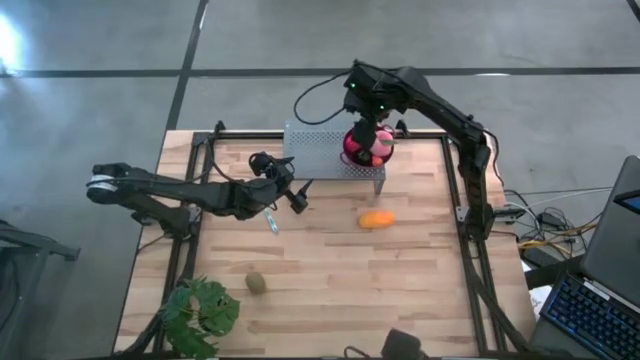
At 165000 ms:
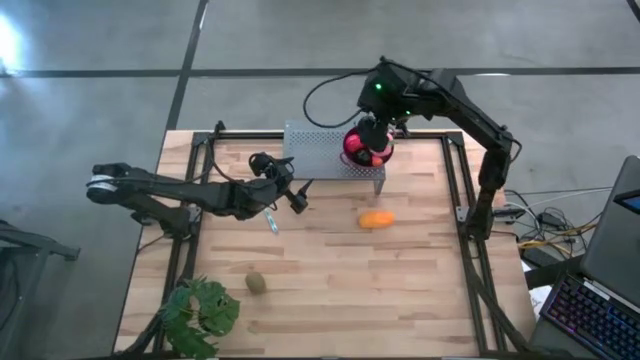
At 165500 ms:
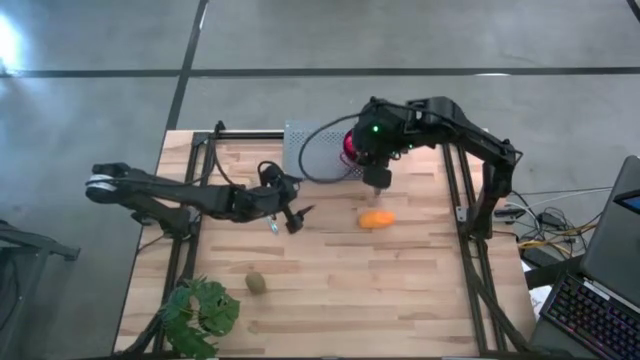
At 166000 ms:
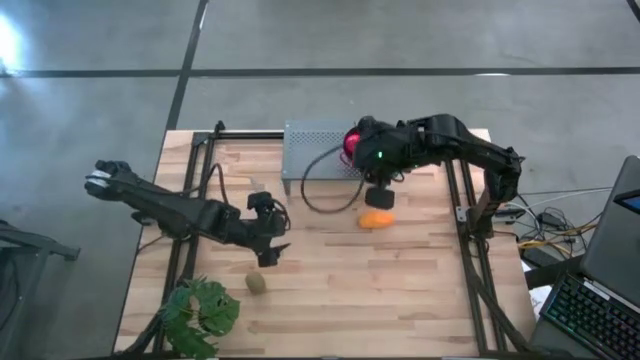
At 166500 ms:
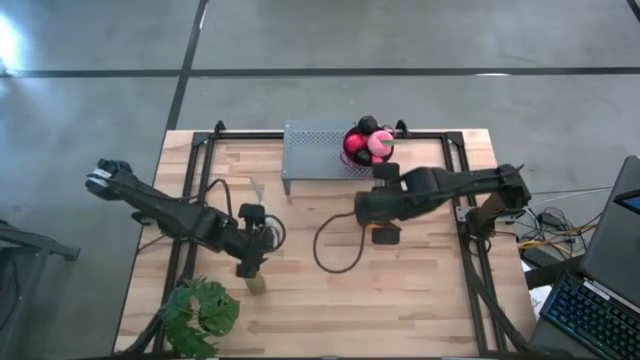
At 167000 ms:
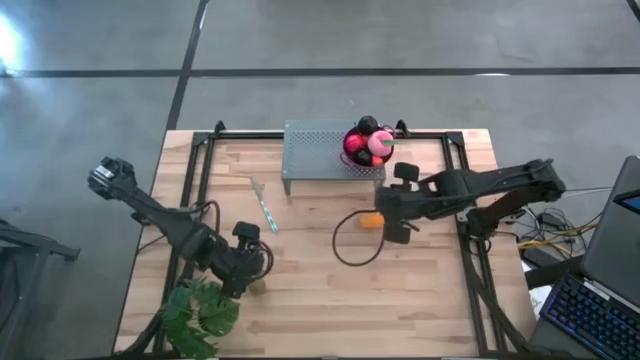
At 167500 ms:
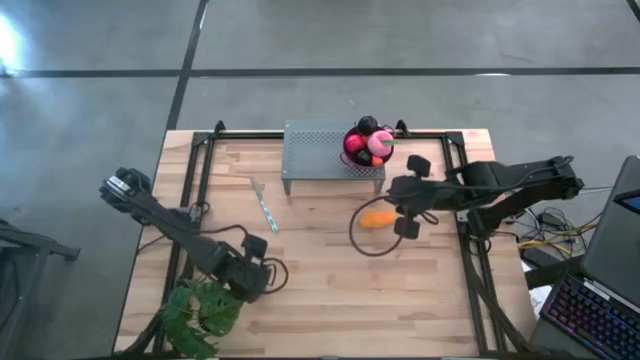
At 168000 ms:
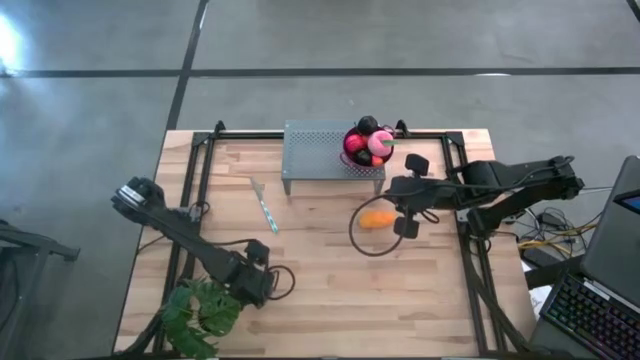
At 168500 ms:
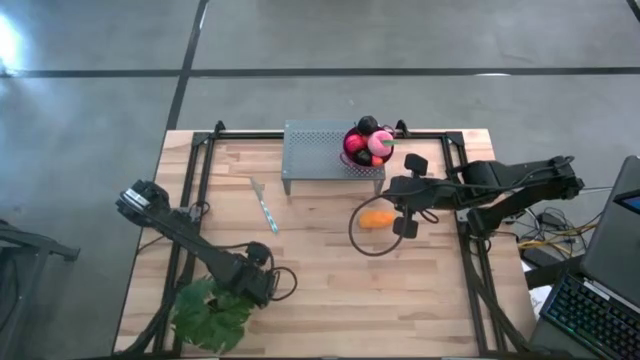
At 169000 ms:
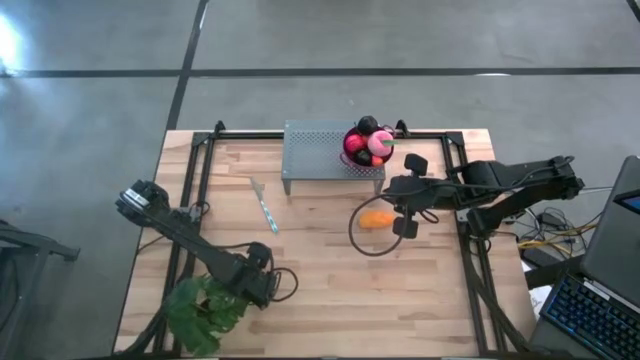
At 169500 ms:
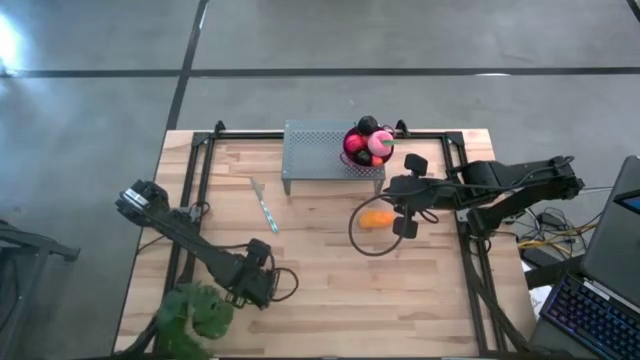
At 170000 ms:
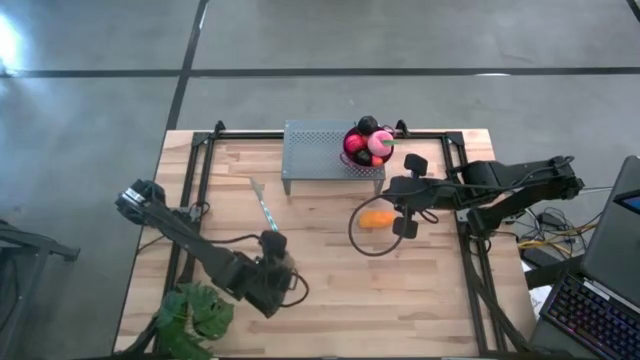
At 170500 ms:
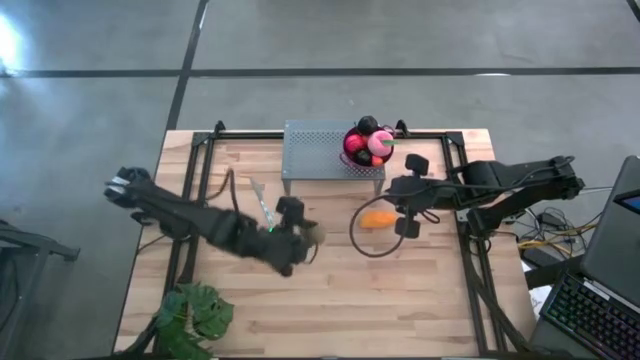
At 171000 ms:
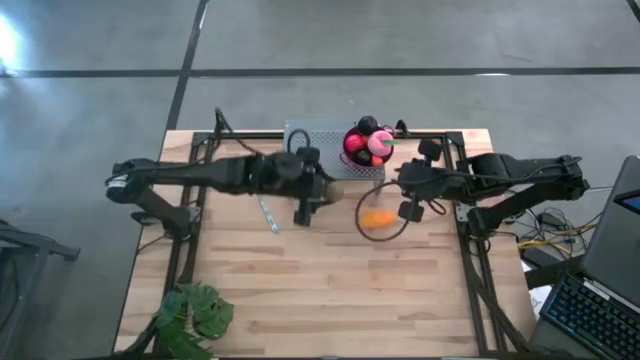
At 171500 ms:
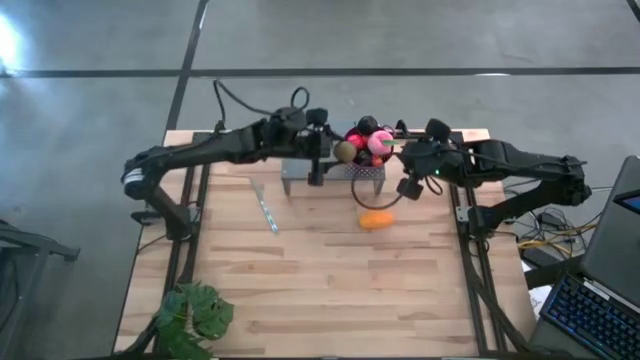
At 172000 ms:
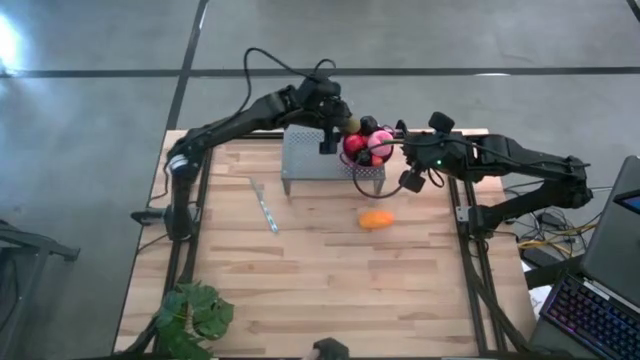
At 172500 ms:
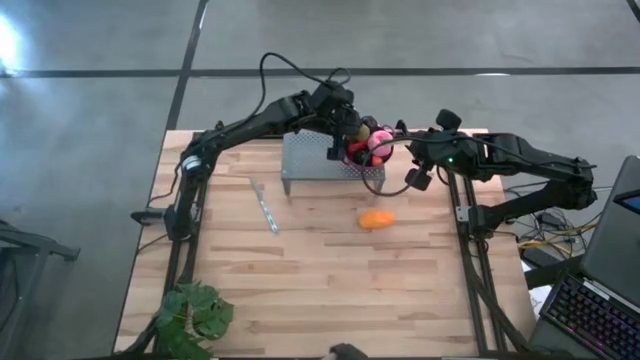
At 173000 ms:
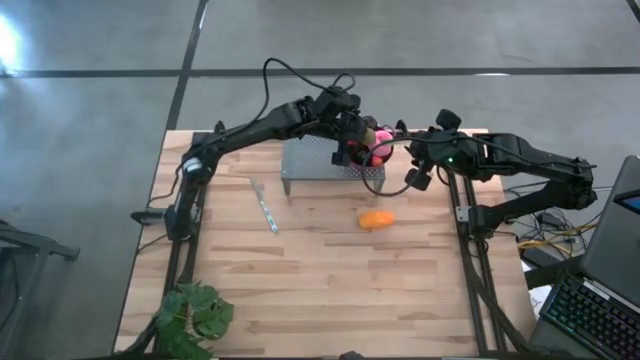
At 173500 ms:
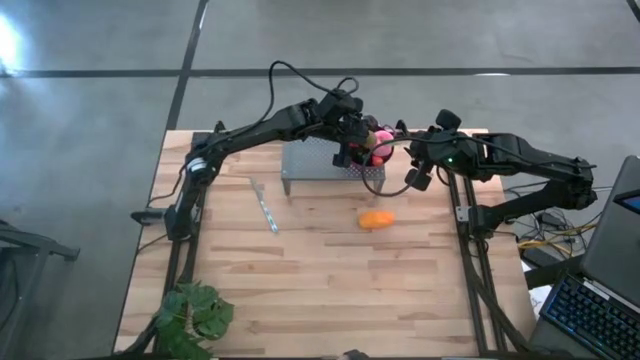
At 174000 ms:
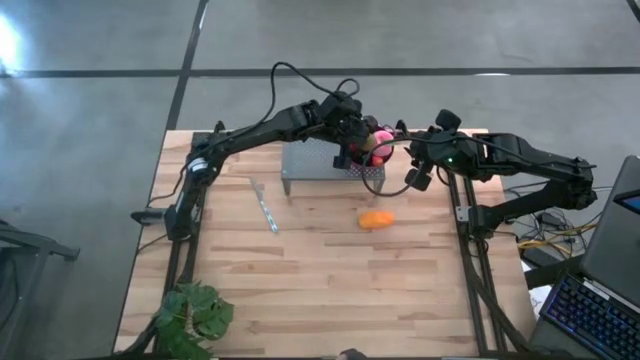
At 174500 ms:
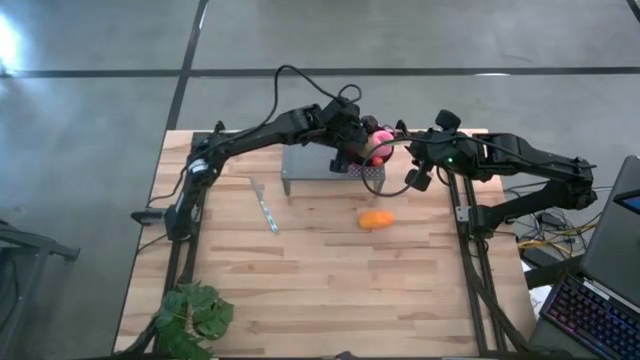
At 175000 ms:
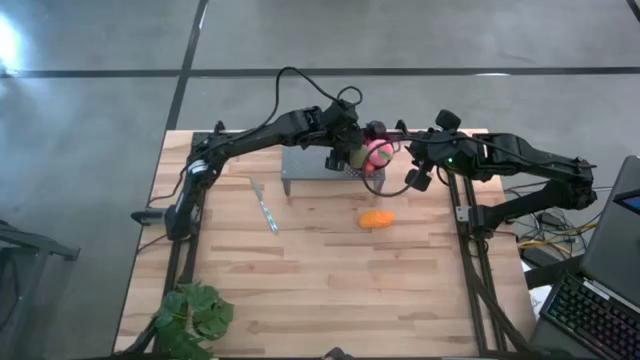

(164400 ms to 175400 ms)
Task: Pick & Place Fruit
Put the kiwi into the purple bowl on the shelf

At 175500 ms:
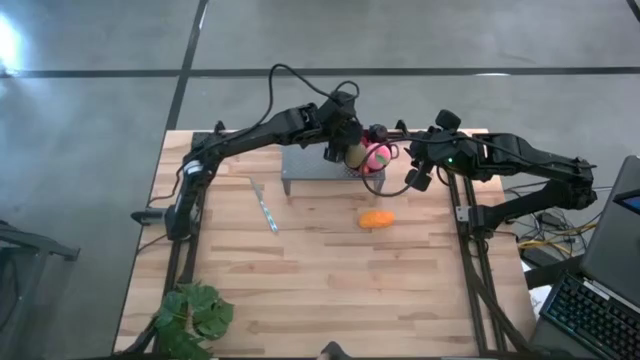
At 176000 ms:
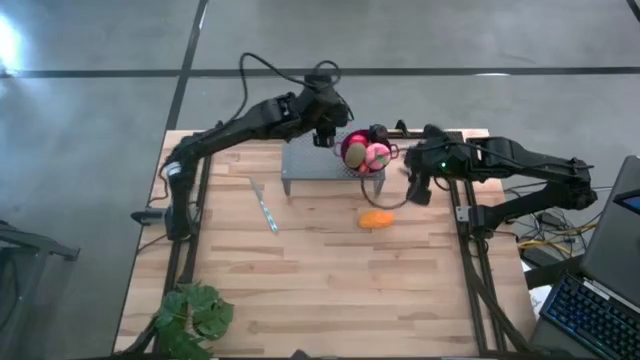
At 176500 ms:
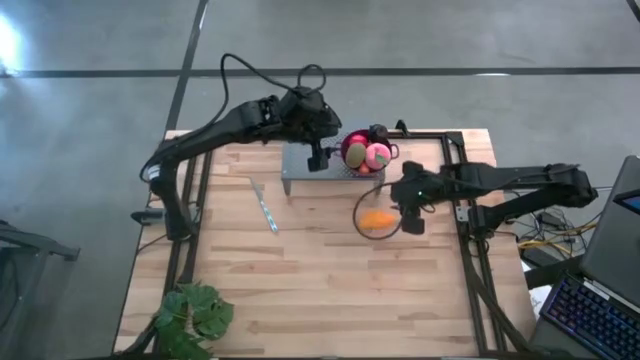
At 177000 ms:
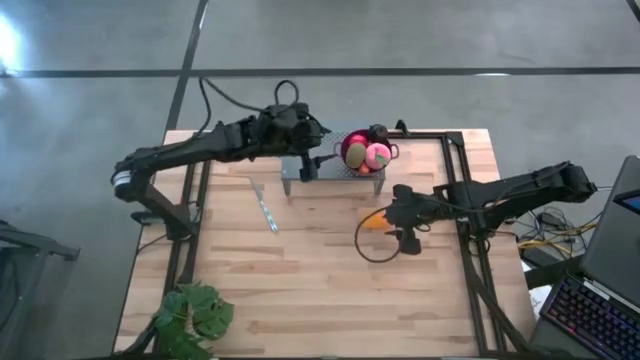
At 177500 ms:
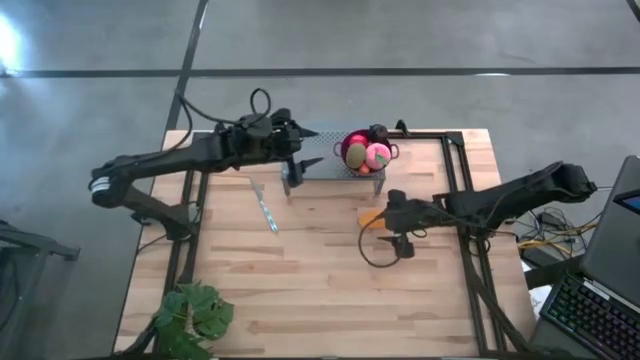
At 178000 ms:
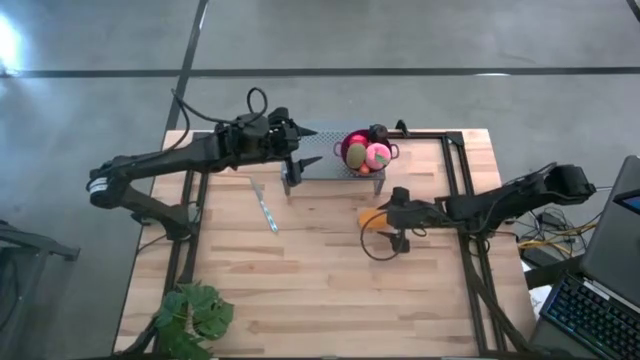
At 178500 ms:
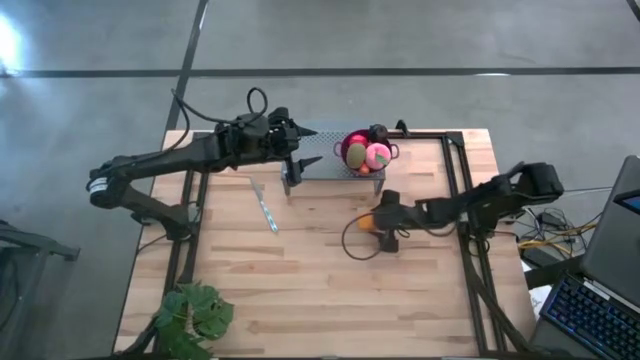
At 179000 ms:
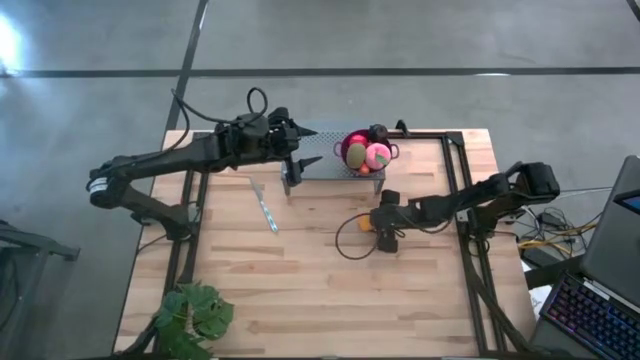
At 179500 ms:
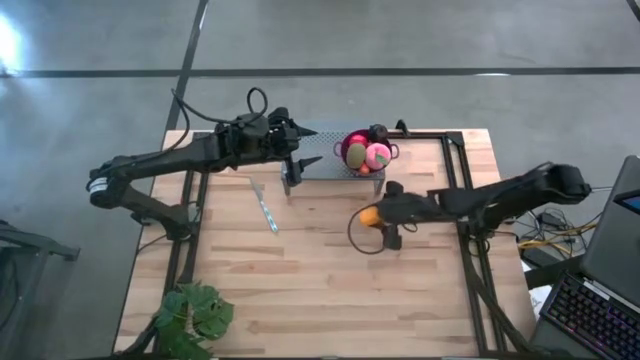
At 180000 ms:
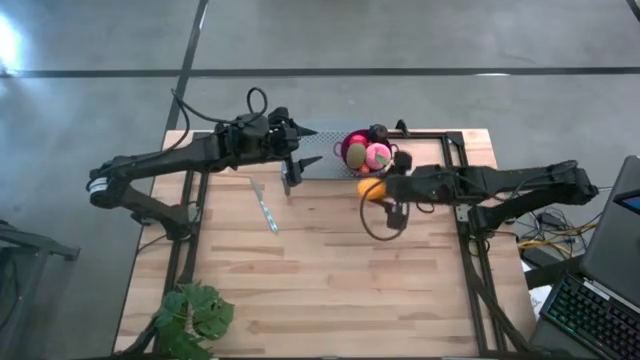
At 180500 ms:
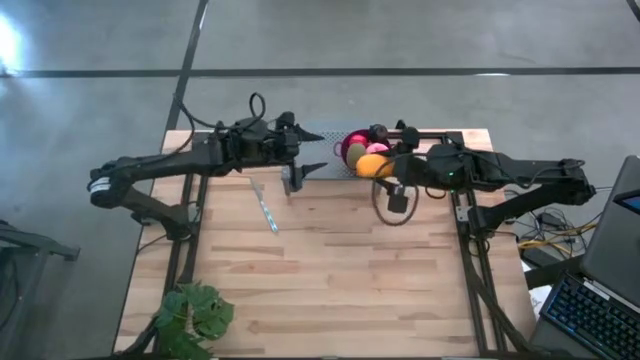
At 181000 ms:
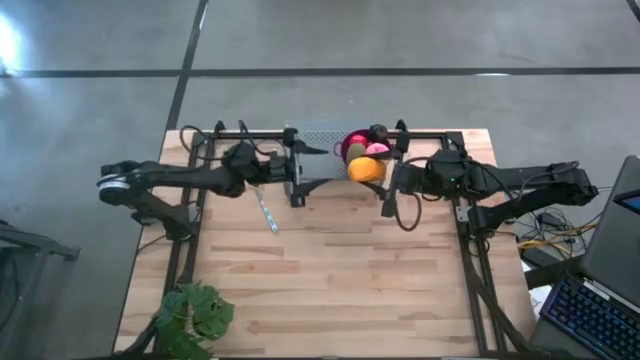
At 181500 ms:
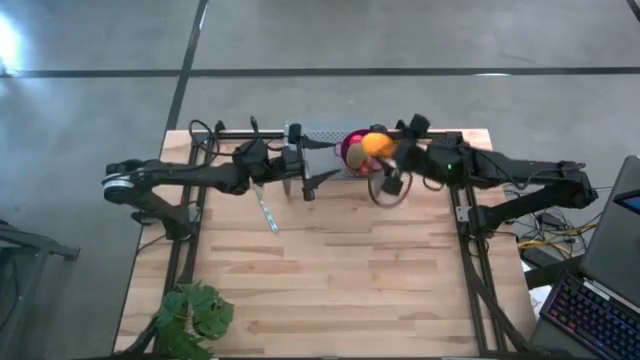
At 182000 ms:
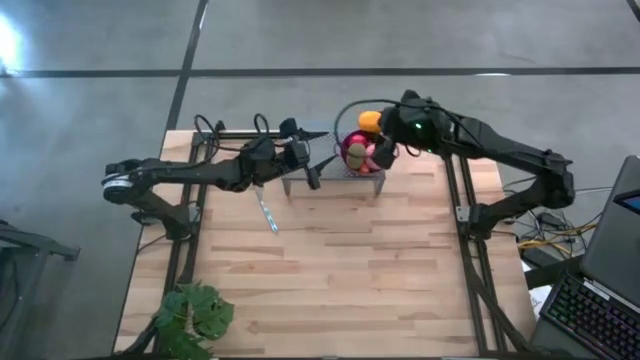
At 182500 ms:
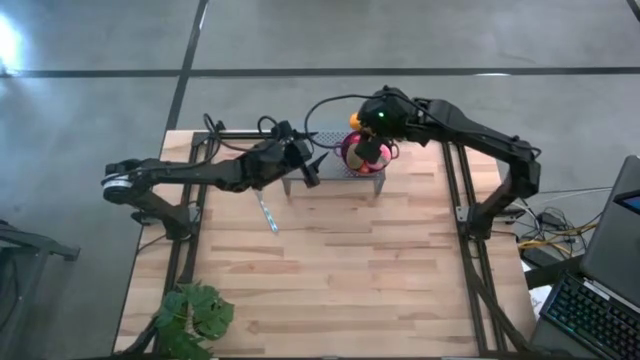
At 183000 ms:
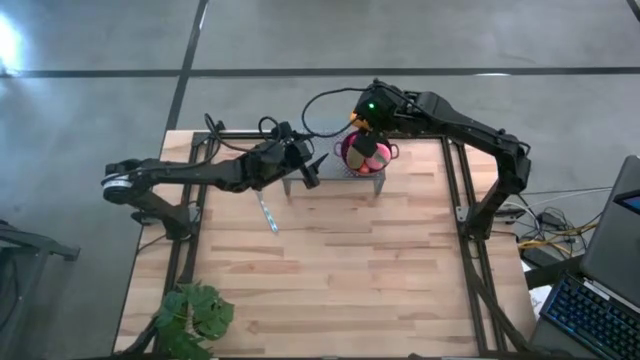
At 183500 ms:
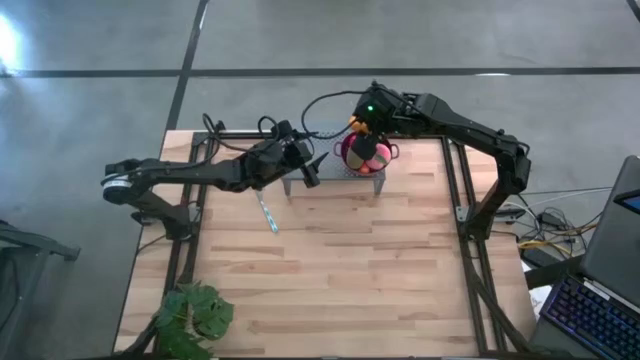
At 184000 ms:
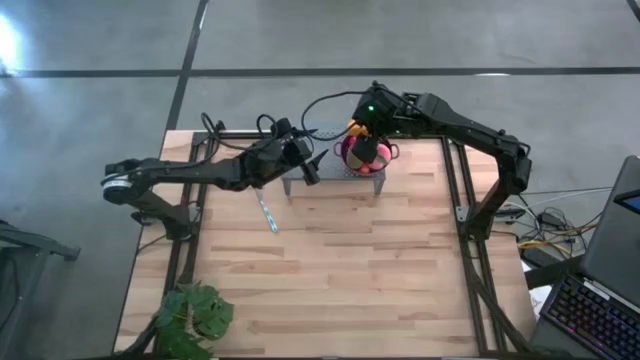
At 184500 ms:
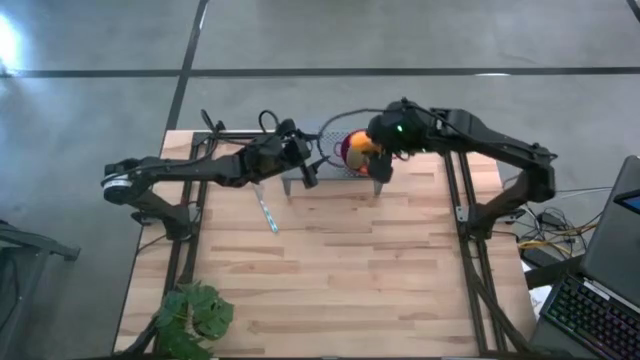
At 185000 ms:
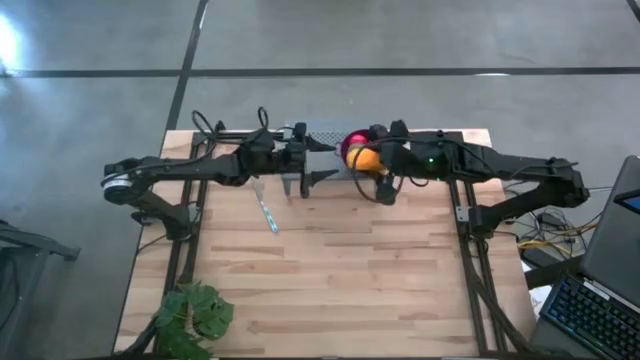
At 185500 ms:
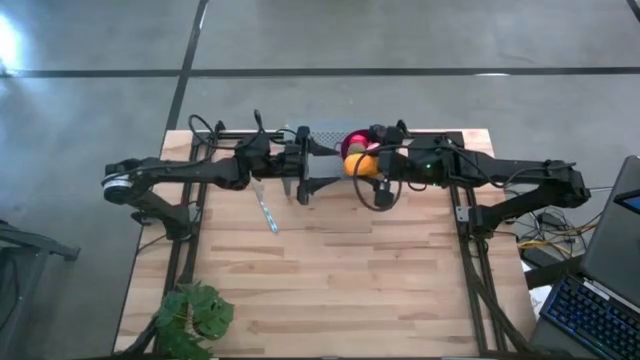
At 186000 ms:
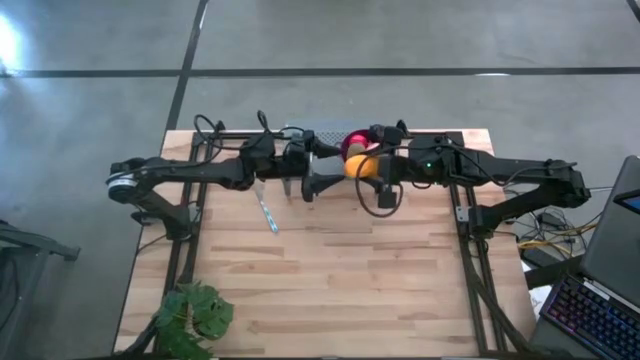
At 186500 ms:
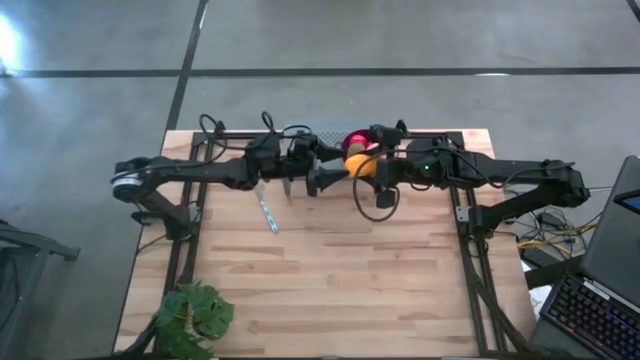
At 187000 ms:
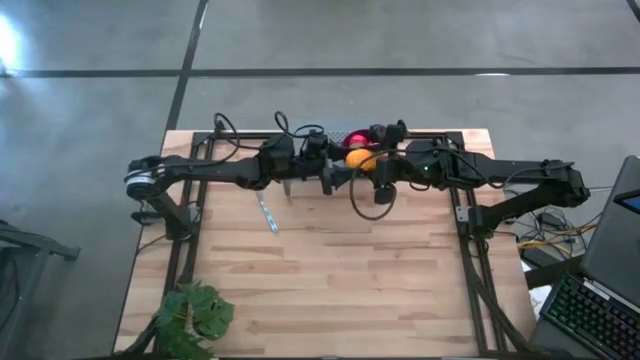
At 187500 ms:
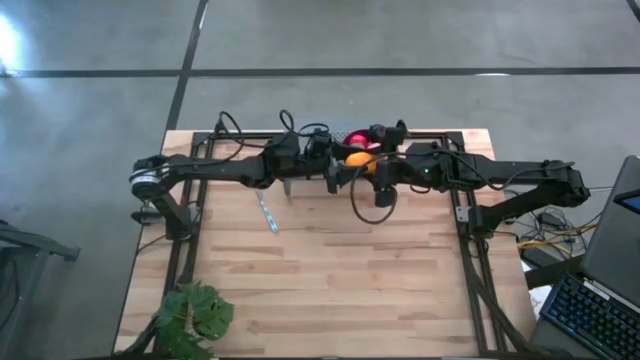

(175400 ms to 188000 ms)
Put the mango into the purple bowl on the shelf
